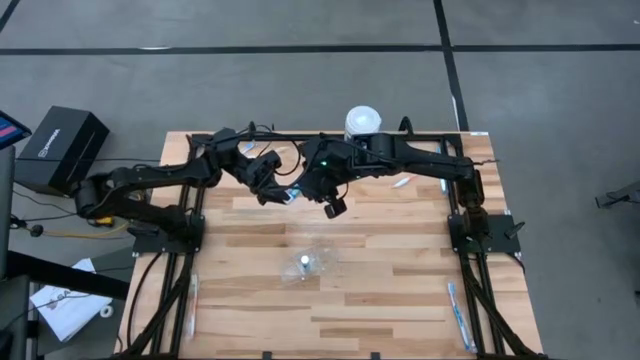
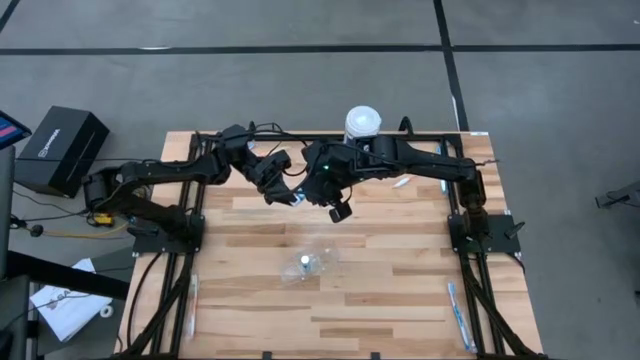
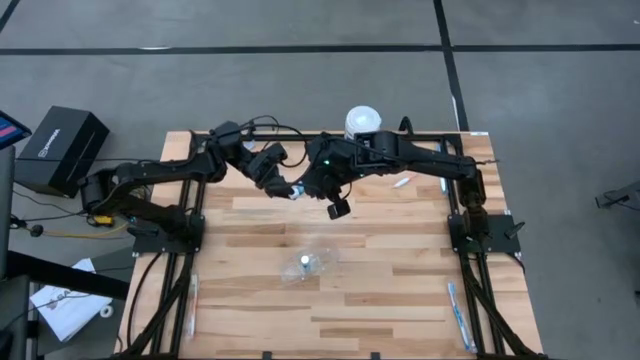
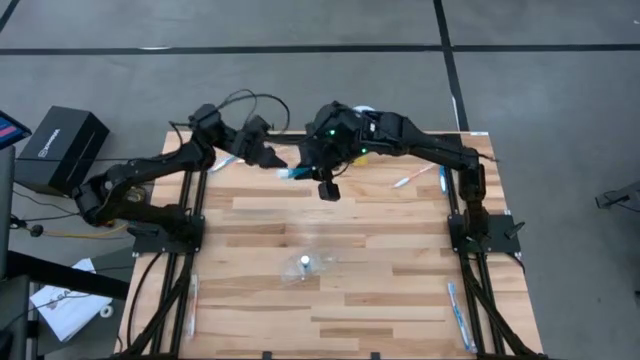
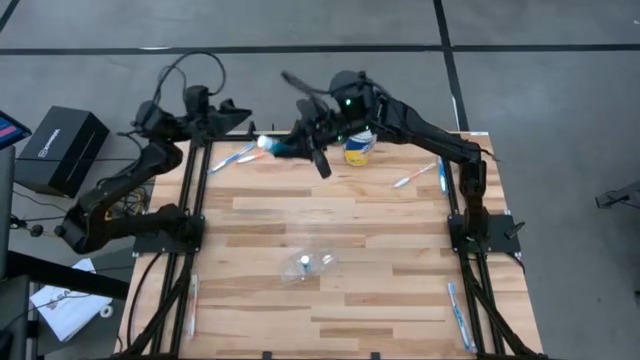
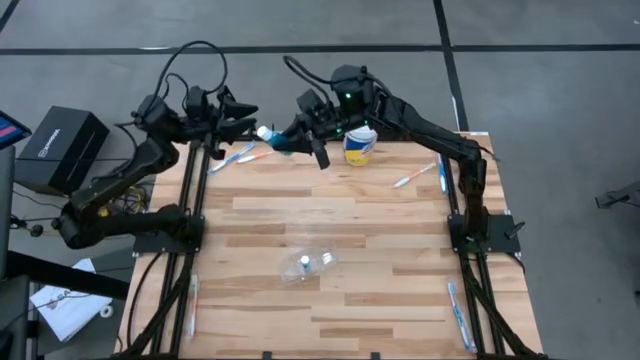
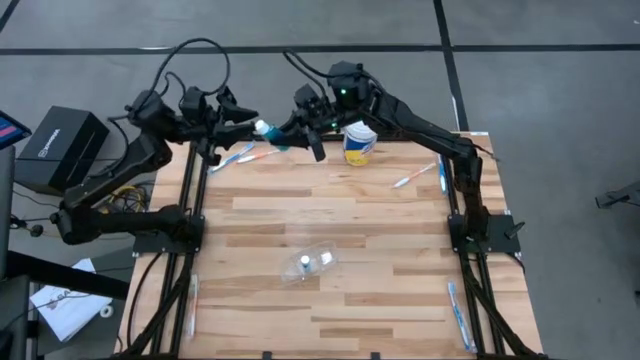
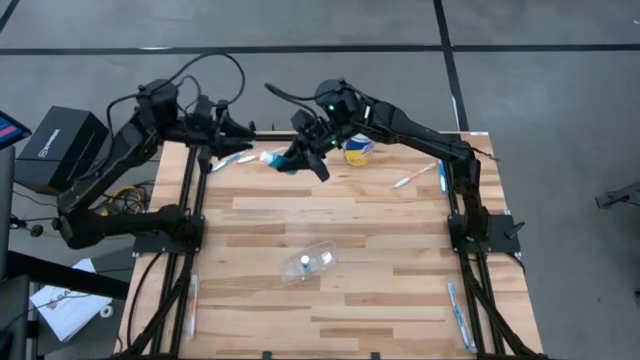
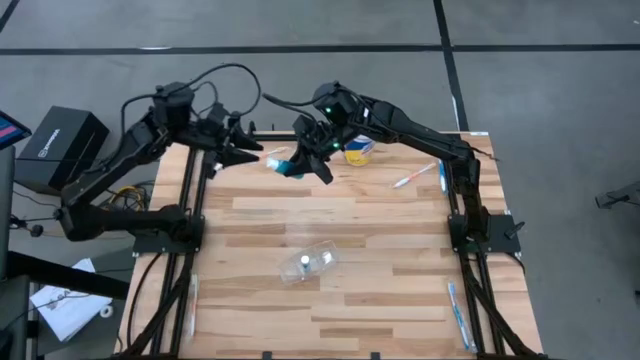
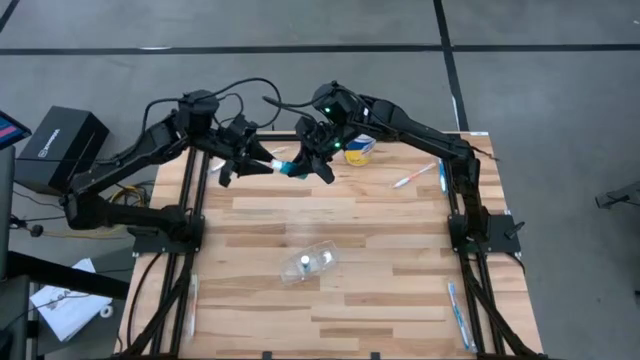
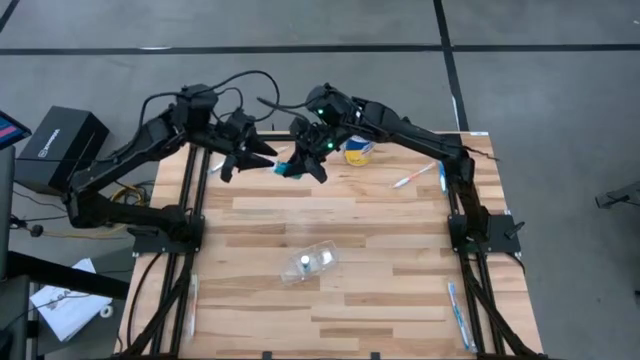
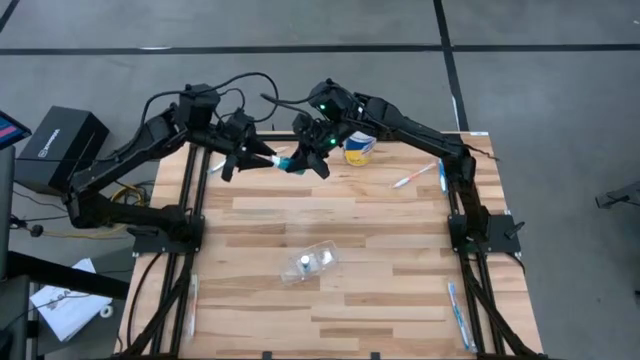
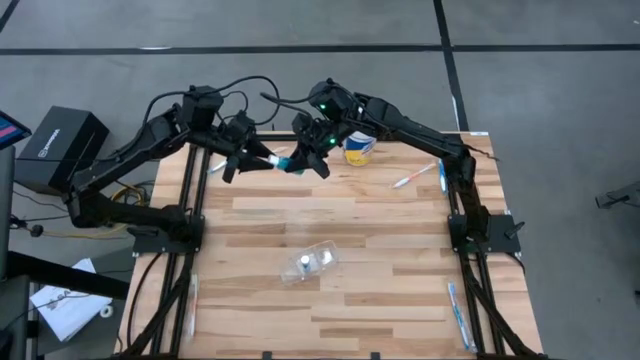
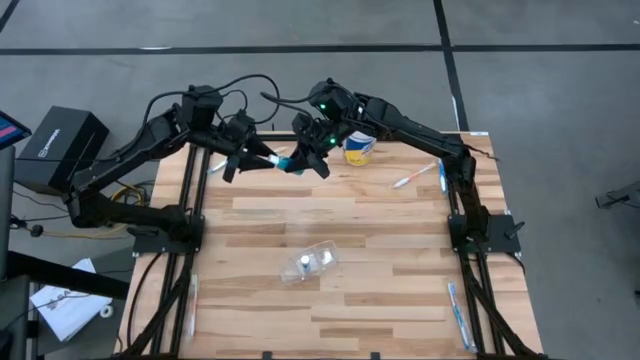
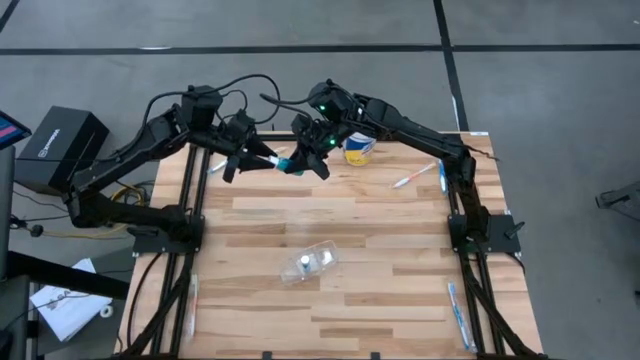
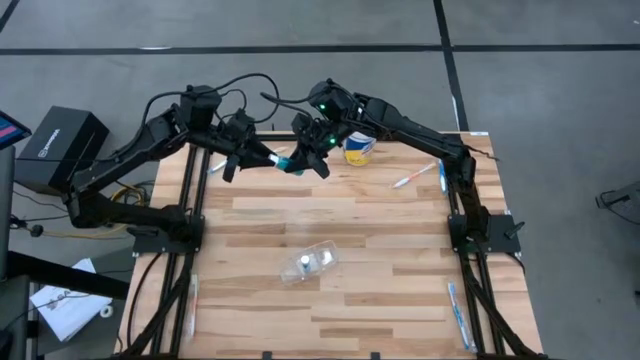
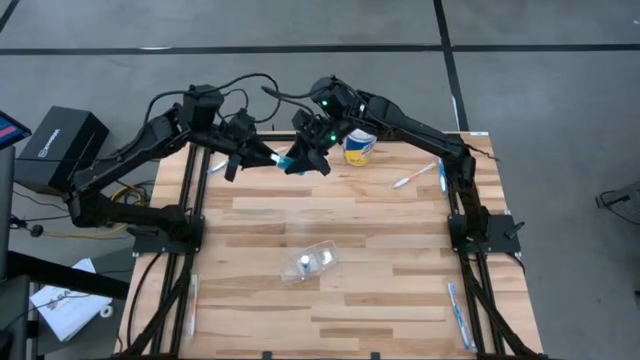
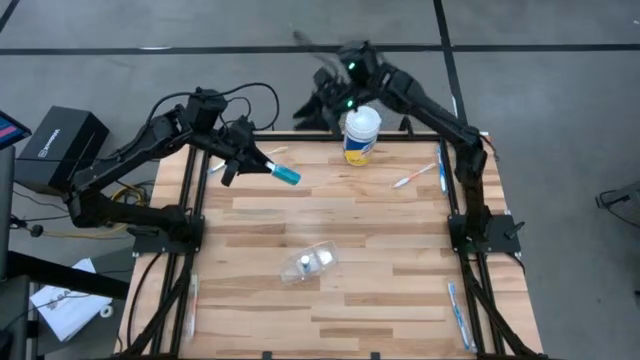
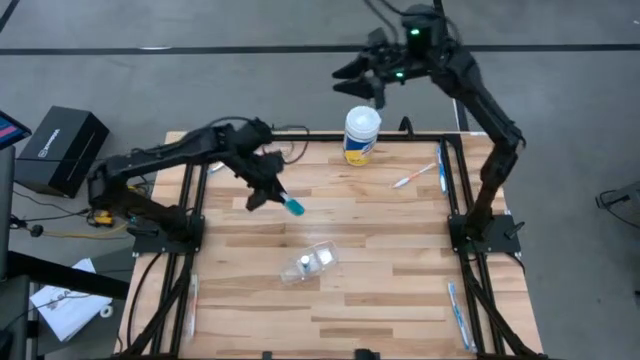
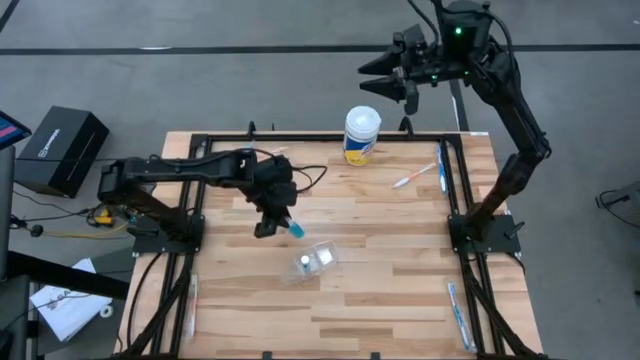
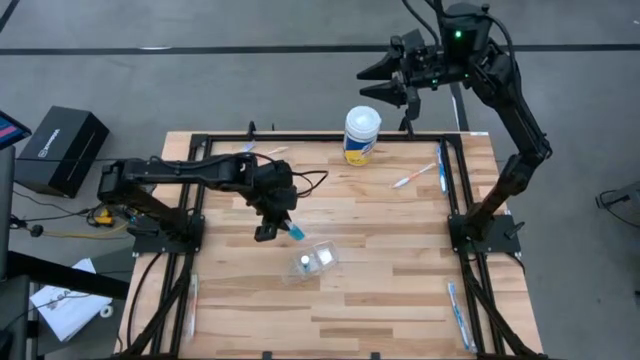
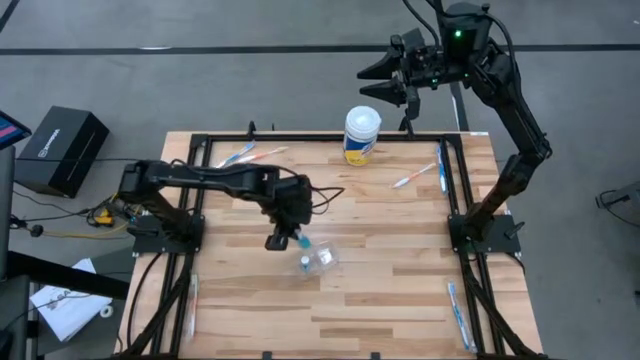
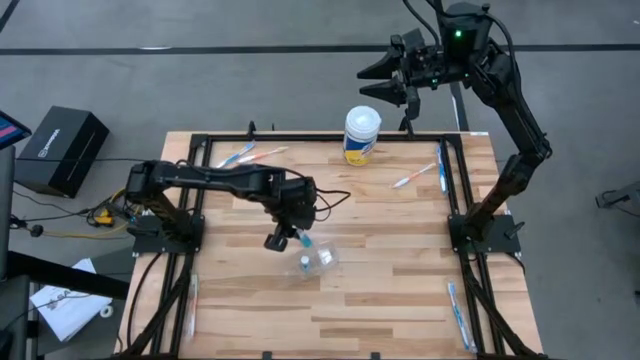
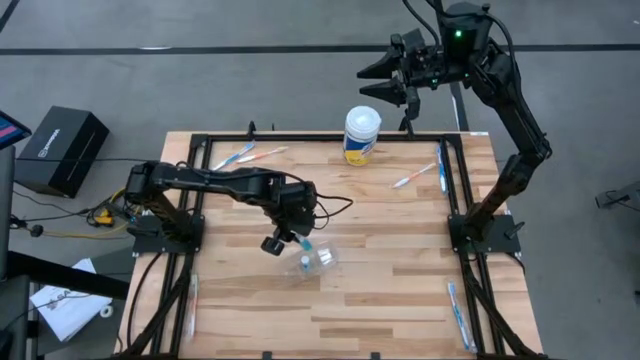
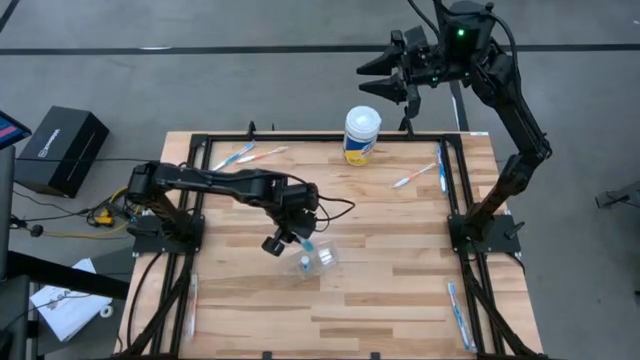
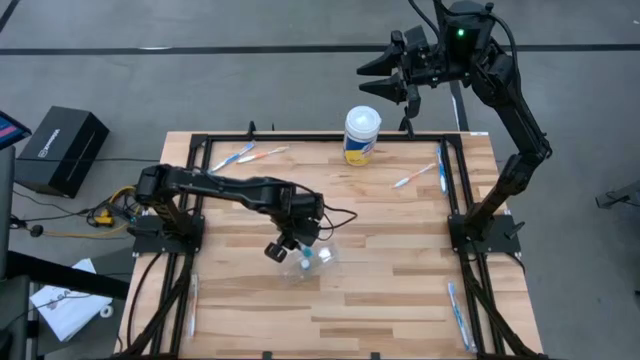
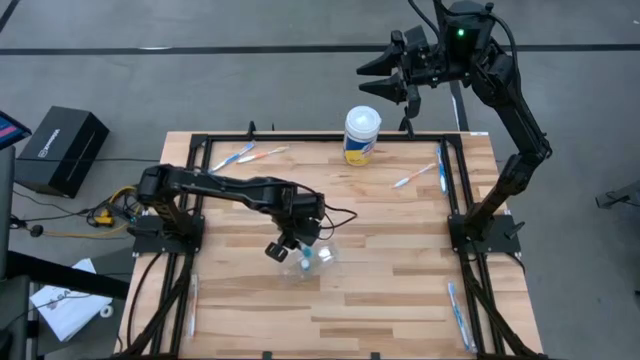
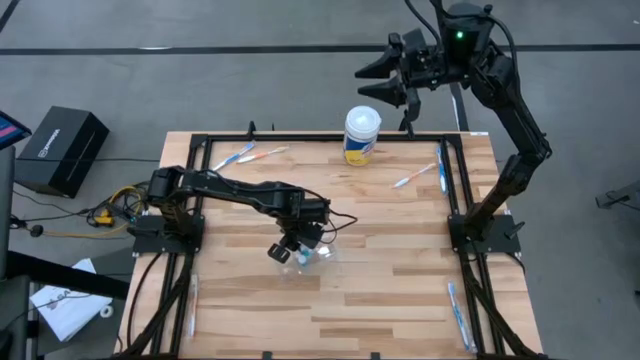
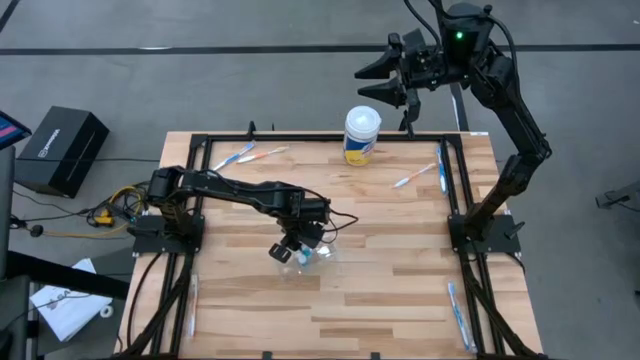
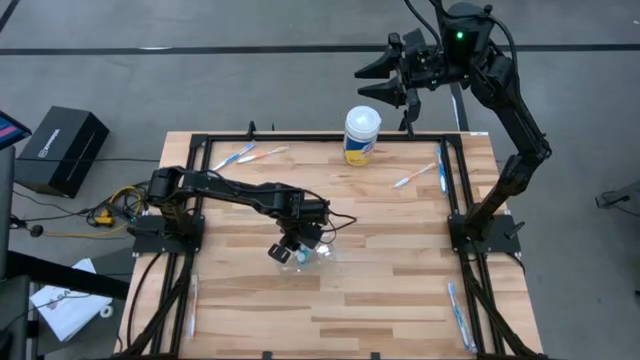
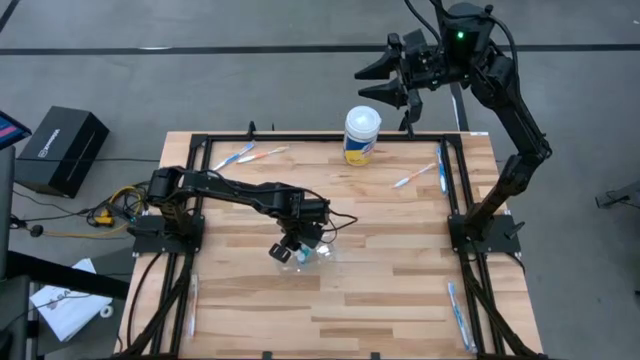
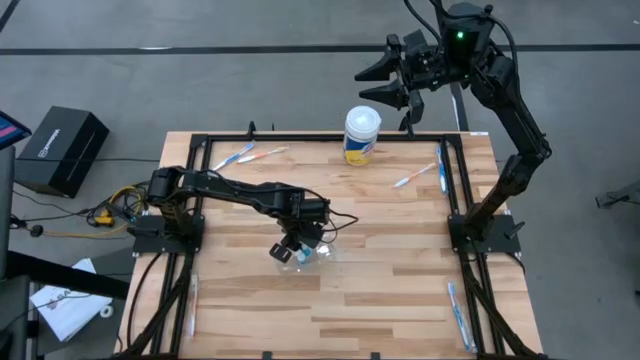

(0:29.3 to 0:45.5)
Task: Pick & Place toothbrushing station
Put the blue mouthwash into the transparent organizer

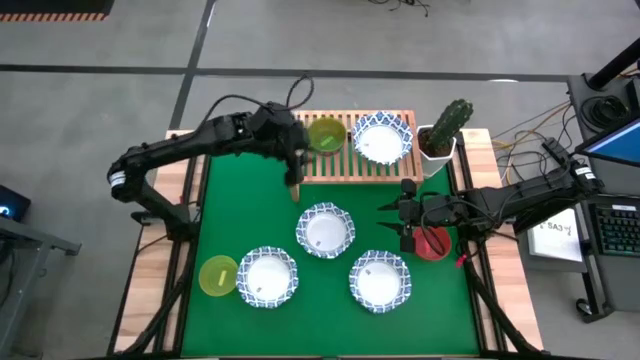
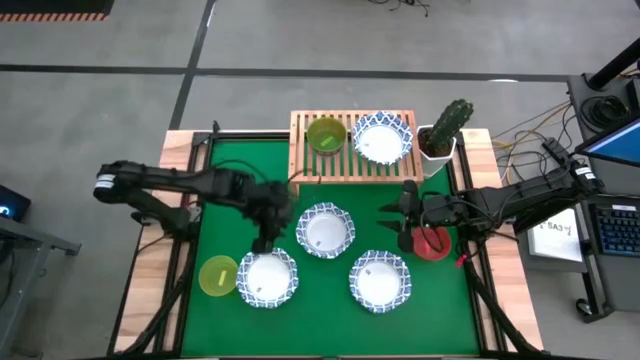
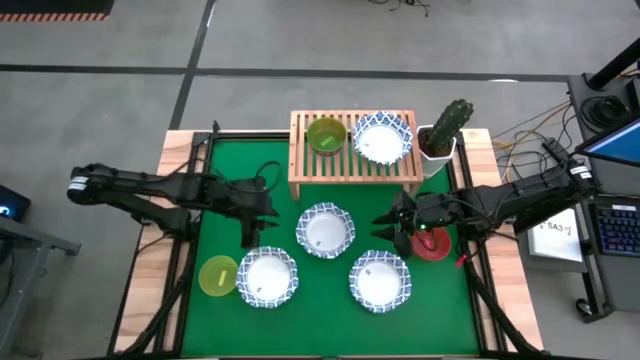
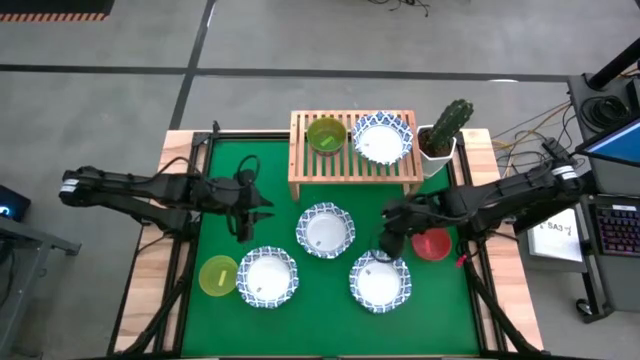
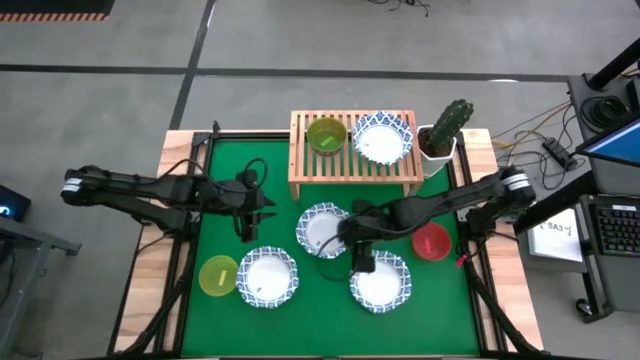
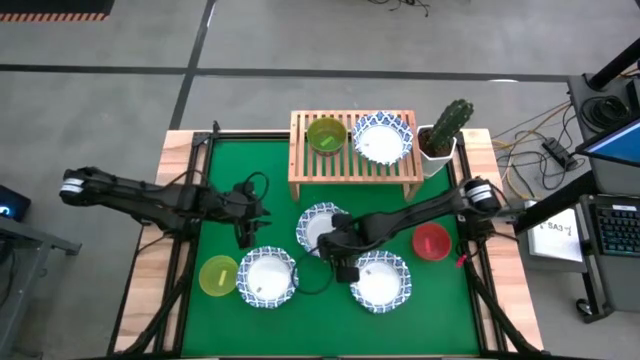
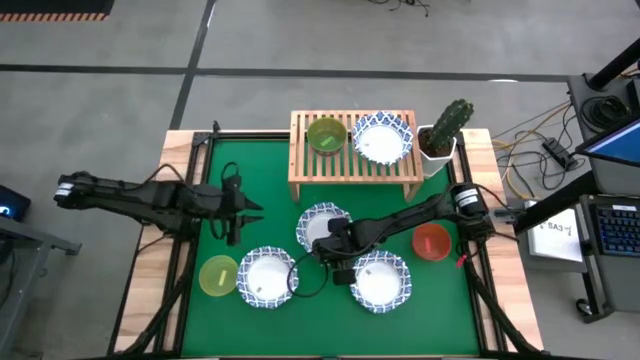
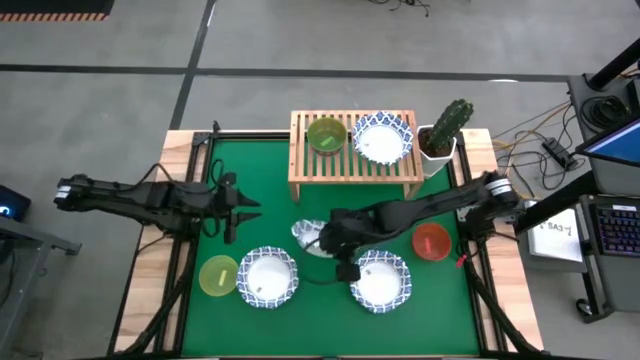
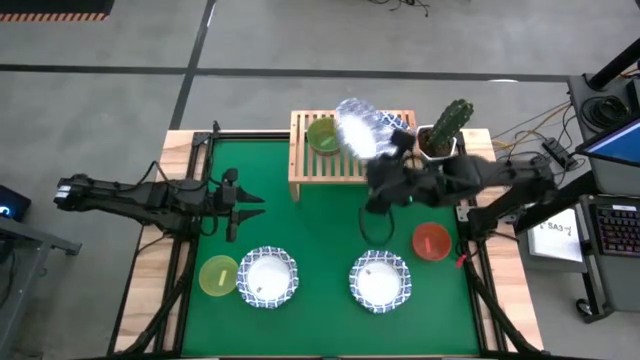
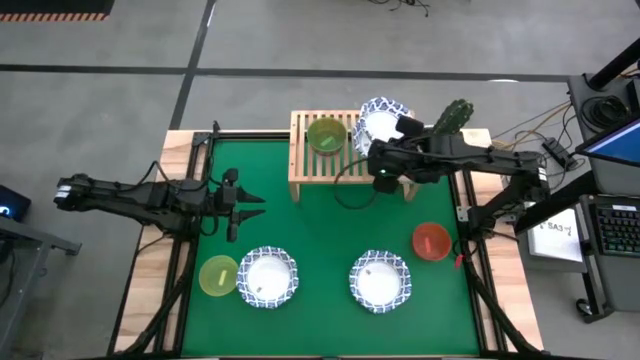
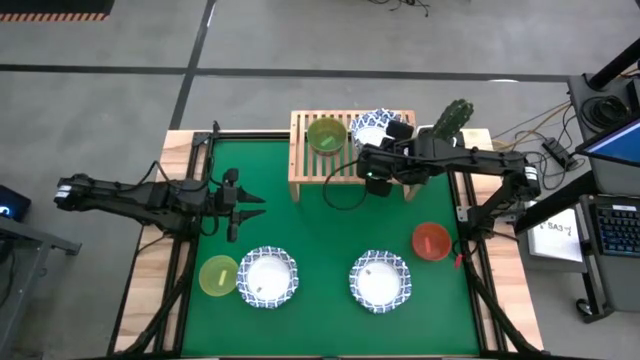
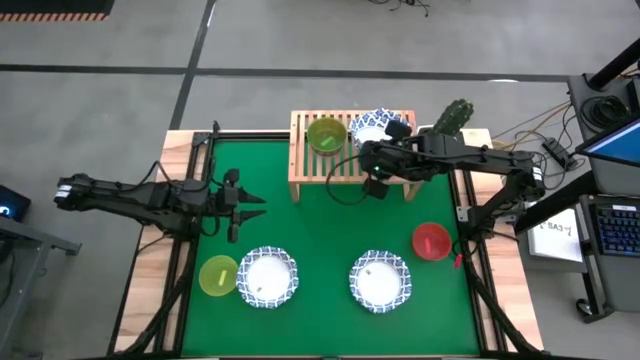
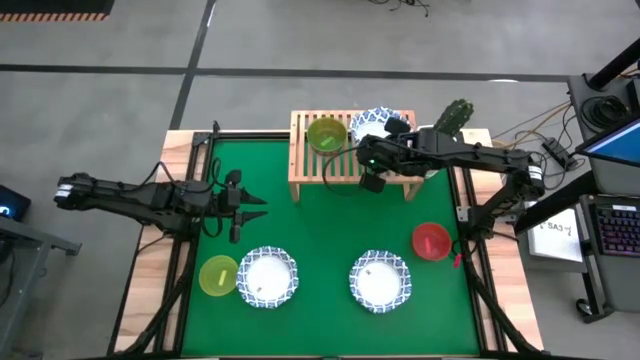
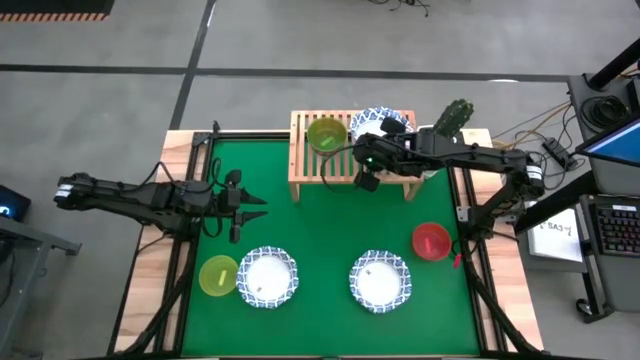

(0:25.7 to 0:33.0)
Task: Place and stack bowls onto a shelf
Stack the big white bowl on the big white bowl on the shelf
